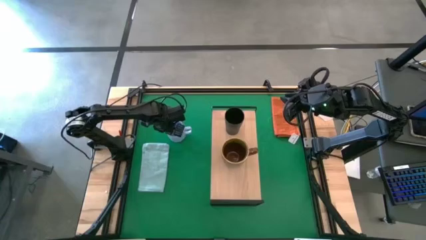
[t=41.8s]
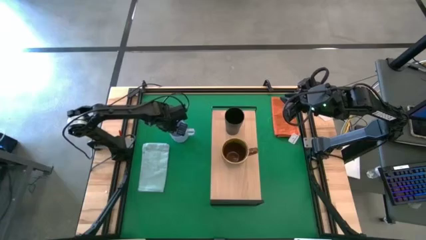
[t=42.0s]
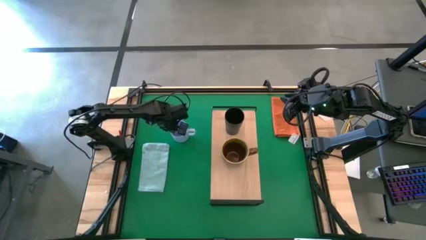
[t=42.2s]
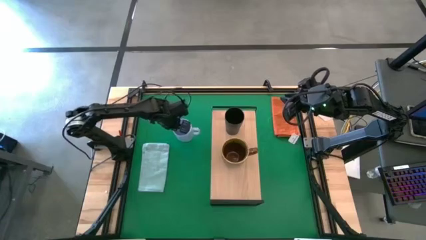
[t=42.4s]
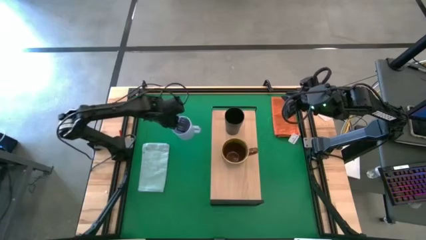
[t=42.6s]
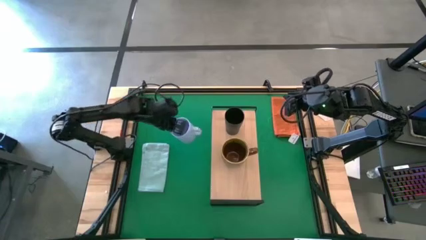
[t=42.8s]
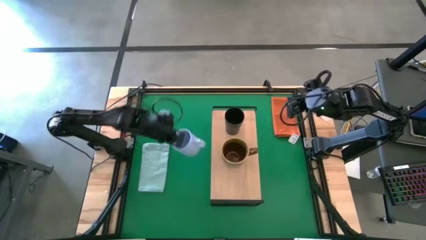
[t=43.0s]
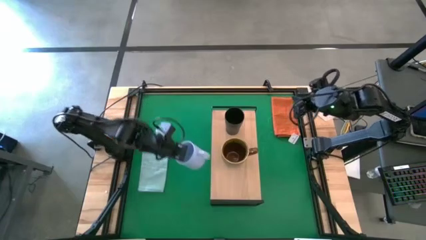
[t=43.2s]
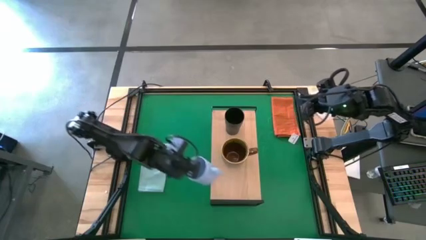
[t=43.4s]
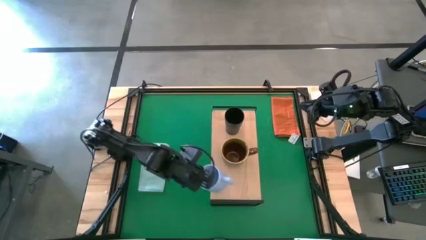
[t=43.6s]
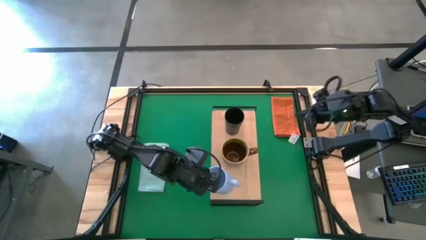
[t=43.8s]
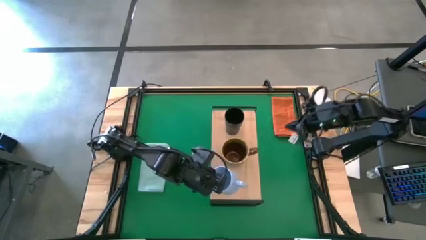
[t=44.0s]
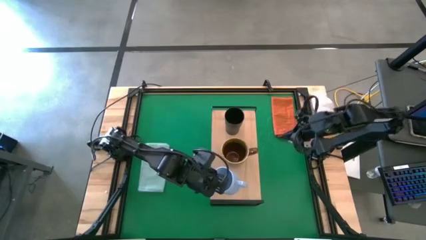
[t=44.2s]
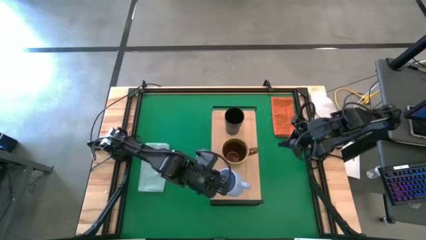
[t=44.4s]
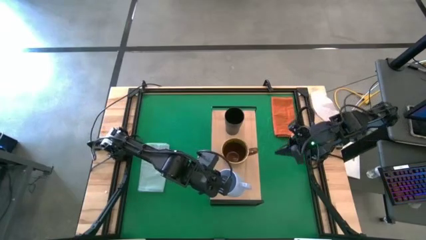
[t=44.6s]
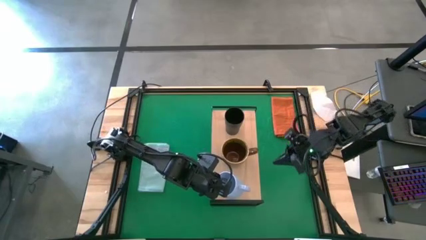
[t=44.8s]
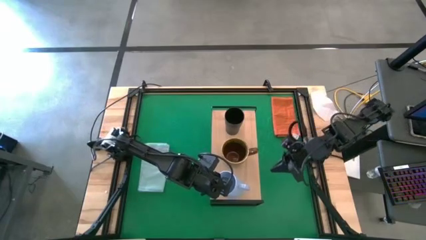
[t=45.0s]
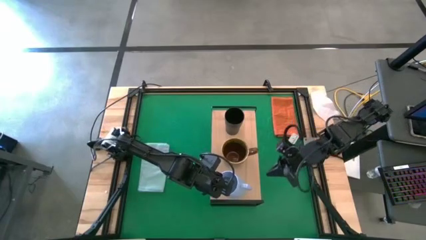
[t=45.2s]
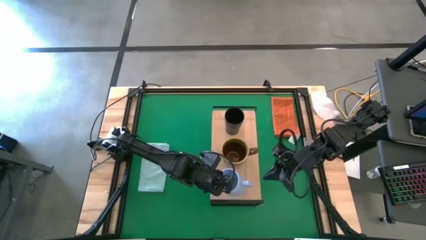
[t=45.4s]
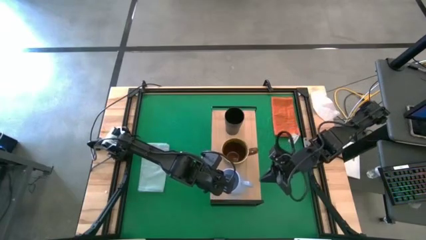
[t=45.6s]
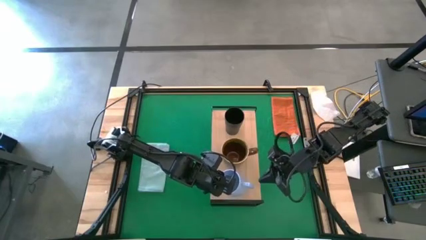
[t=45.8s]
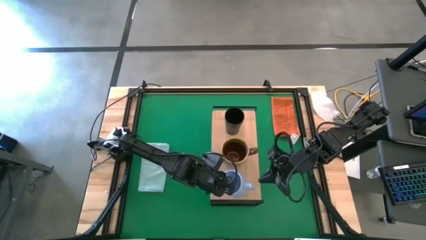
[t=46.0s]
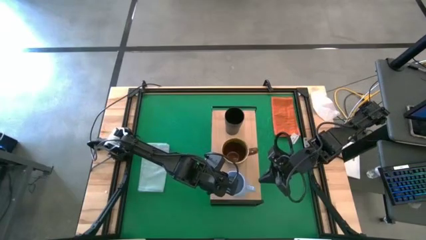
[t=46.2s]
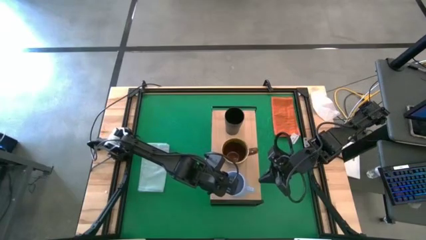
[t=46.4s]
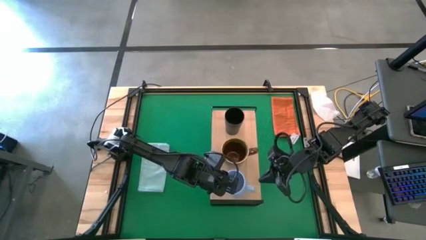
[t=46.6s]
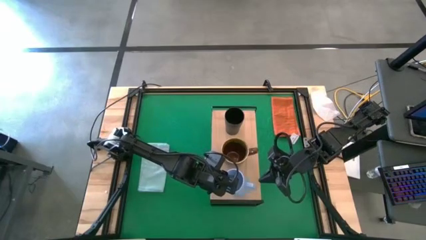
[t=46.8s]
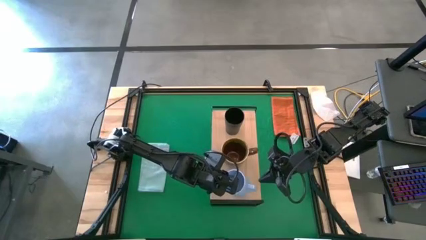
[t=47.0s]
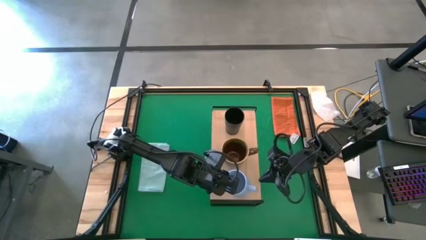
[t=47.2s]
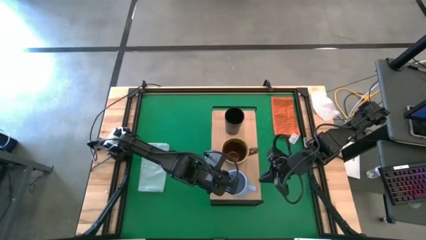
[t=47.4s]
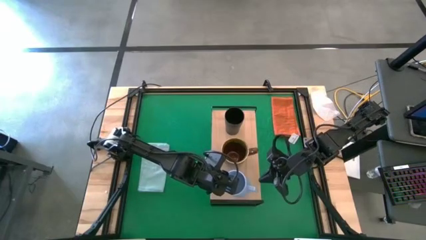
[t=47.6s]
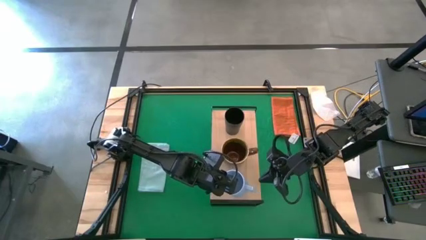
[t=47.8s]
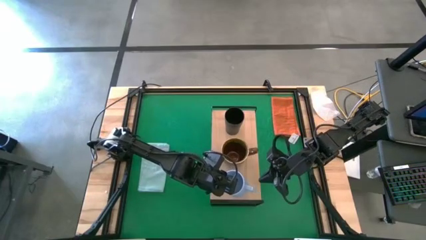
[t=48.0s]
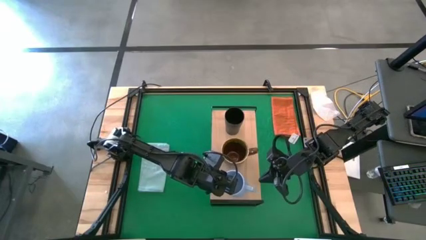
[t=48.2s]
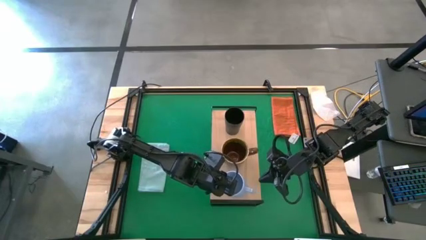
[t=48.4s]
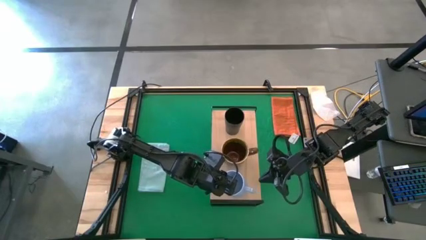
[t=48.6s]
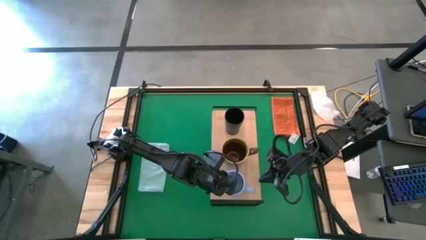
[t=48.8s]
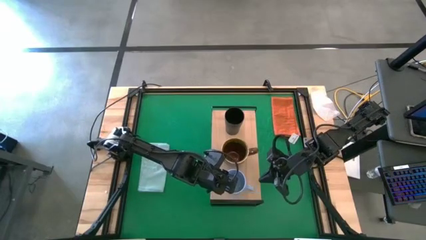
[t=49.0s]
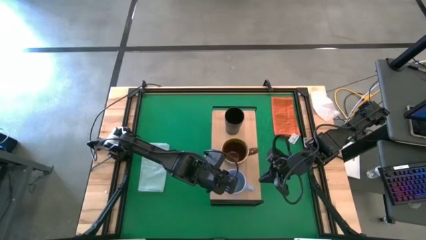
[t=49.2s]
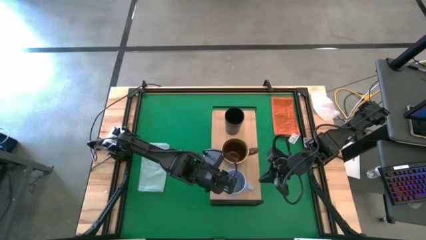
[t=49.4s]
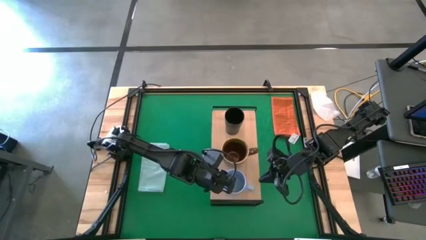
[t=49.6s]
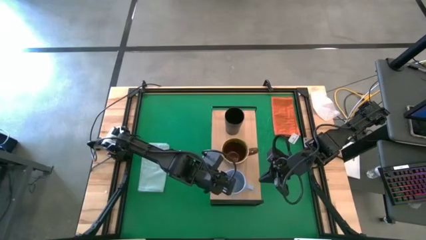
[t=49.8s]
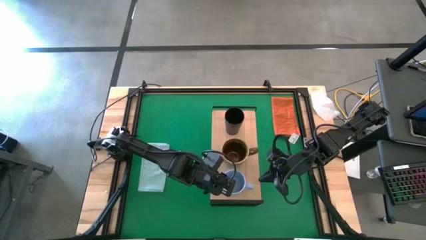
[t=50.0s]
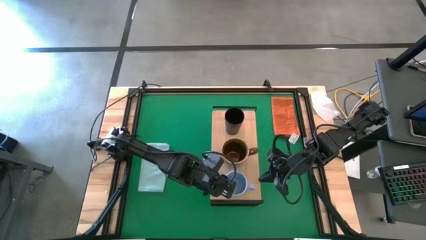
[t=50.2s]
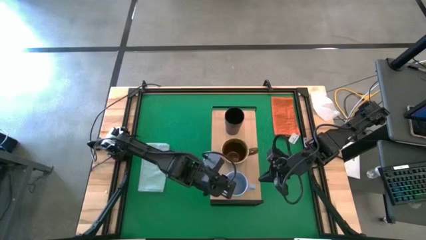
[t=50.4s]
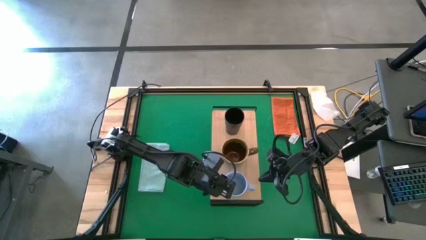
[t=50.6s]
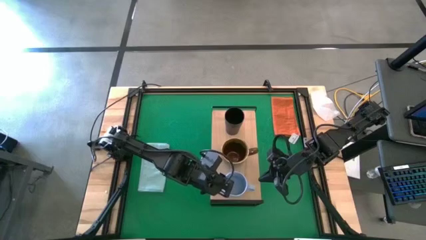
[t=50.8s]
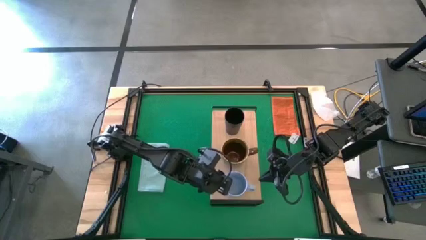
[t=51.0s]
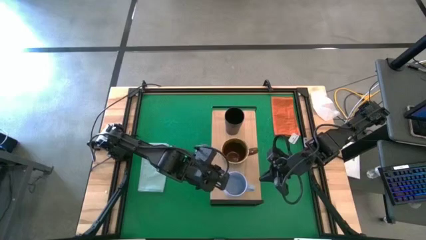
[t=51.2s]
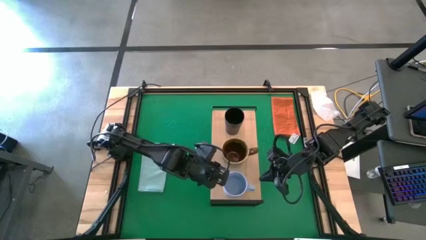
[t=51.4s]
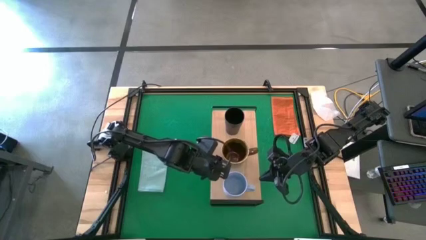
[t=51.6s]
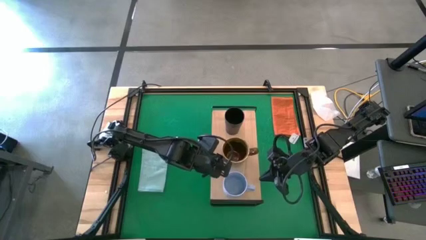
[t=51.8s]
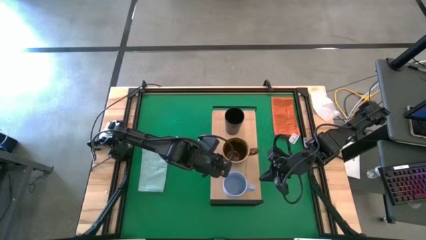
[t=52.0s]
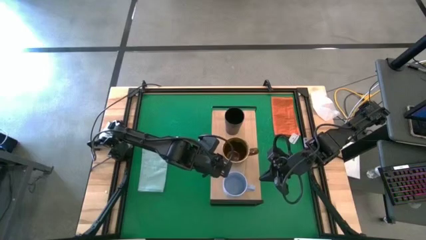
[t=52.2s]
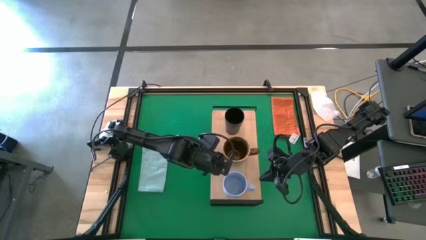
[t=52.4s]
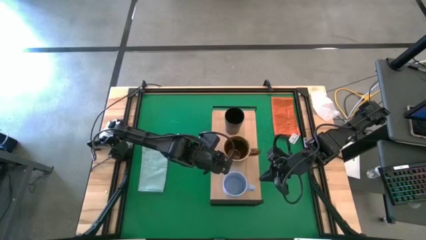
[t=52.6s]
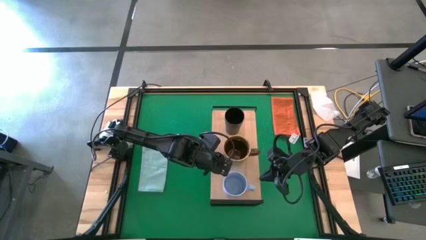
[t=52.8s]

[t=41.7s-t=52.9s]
Task: Stack small to large cups/mugs on shelf
Put the blue cup on the shelf aligned with the green cup

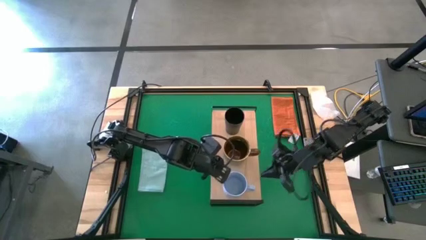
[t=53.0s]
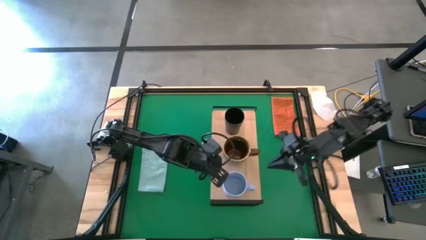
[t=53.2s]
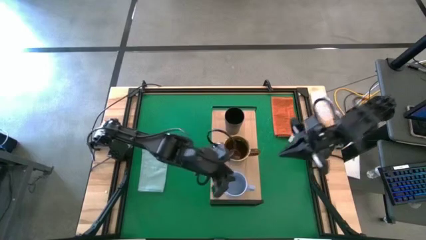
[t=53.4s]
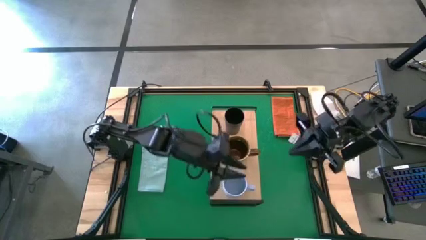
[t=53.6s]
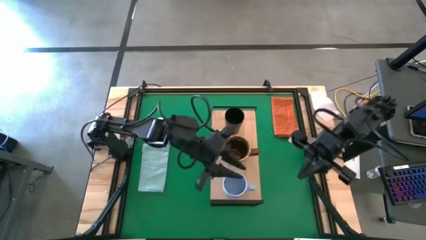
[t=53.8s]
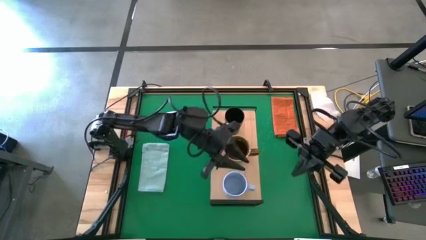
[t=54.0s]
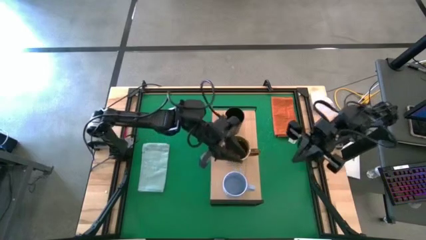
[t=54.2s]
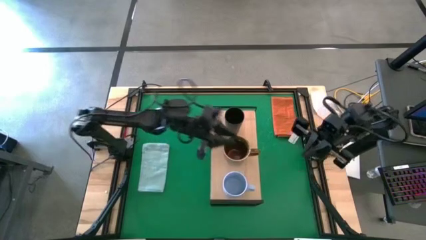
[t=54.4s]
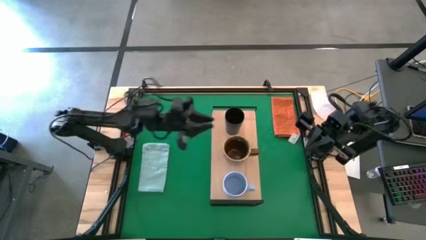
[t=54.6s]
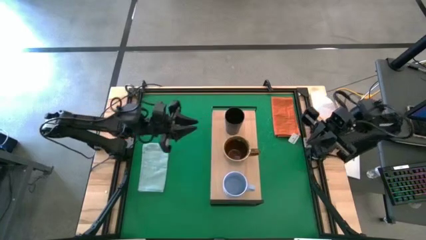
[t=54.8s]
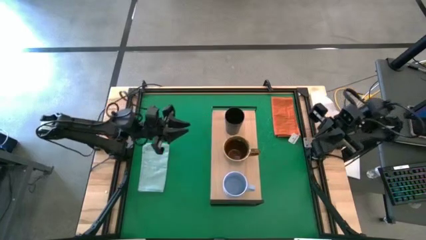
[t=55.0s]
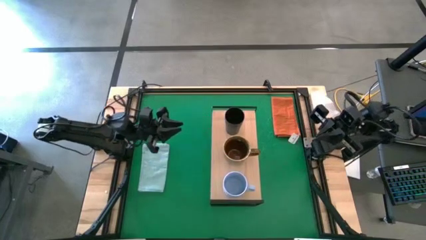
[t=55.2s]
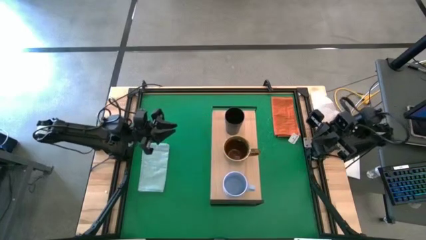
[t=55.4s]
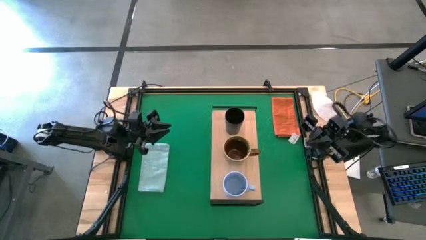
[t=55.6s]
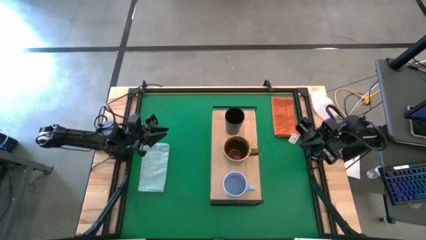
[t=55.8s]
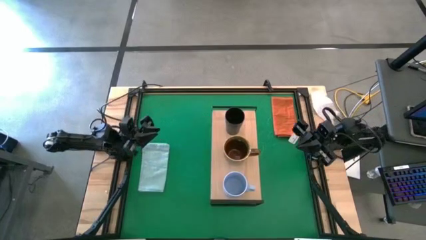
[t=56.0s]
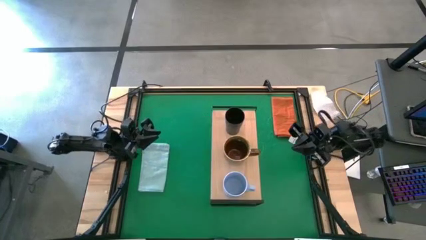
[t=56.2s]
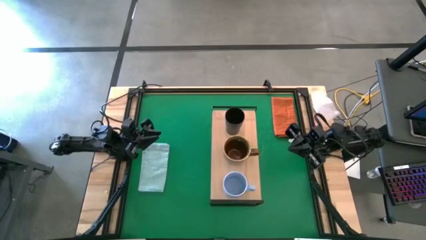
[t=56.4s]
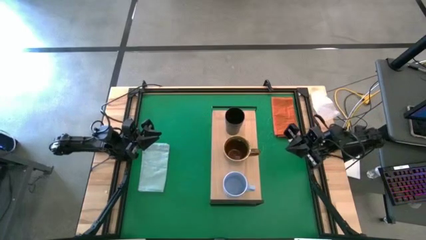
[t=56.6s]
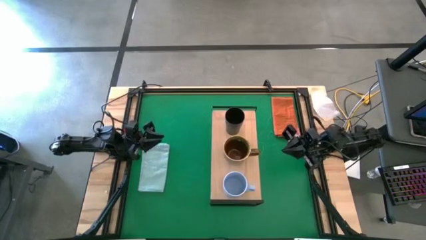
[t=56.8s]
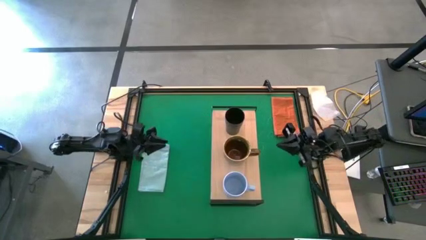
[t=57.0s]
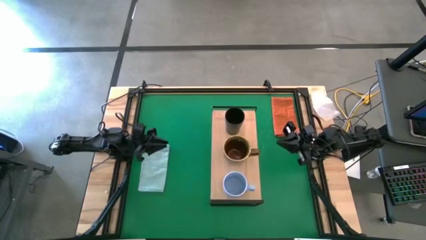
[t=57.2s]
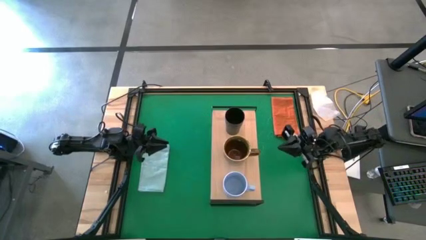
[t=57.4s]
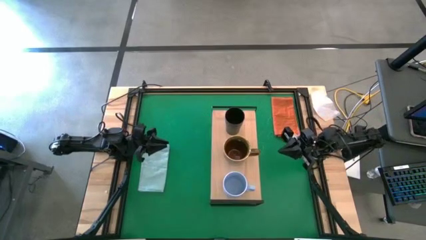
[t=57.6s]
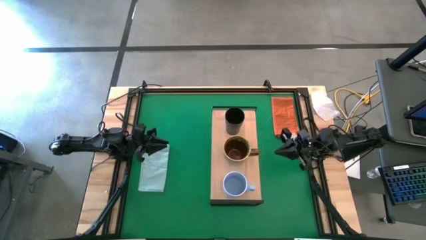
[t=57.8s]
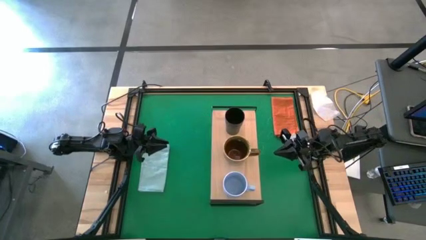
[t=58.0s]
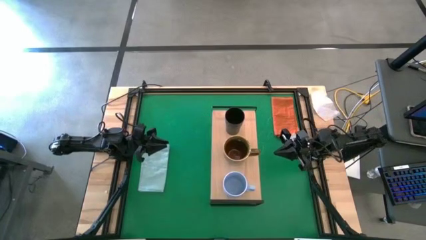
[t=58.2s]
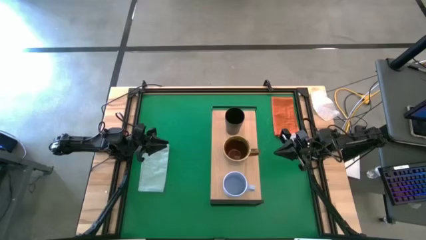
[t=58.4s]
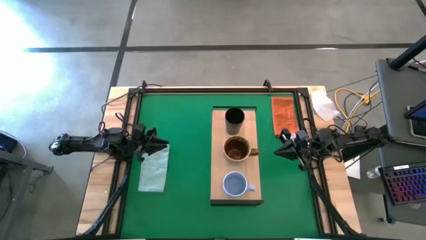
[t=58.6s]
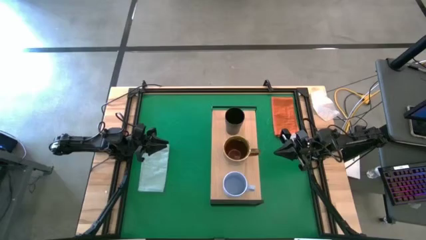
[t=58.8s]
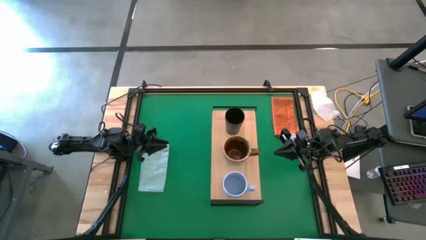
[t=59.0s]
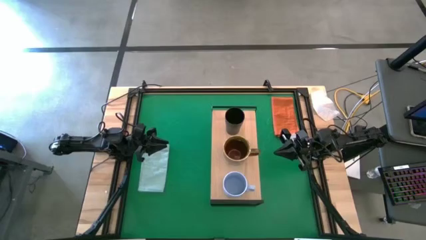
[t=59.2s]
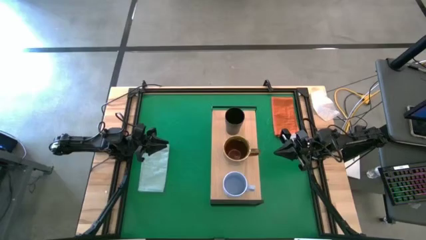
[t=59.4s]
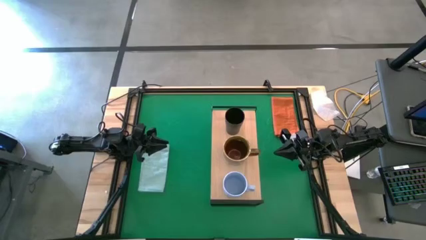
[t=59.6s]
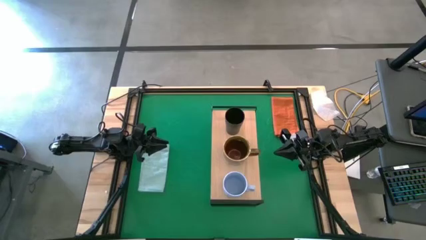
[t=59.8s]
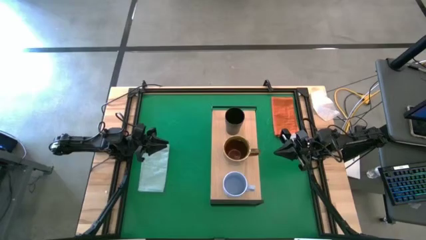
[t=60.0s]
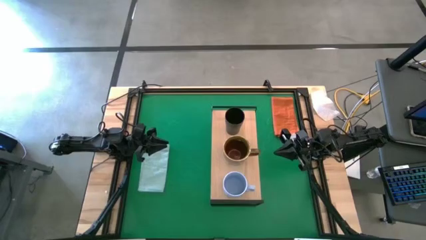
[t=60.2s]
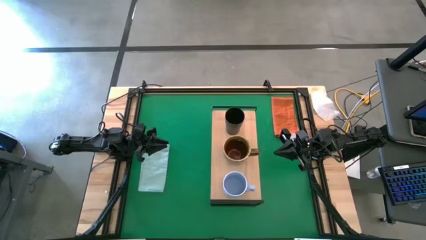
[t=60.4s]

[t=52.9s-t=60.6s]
Return to Home Position
